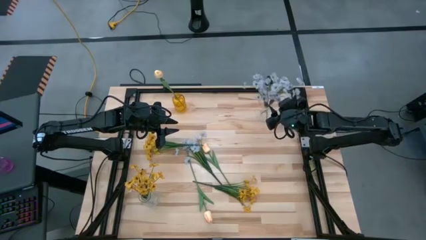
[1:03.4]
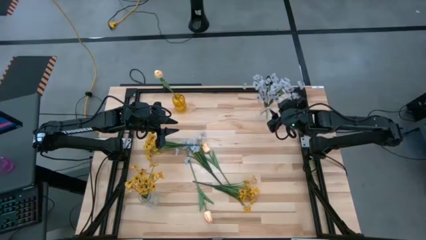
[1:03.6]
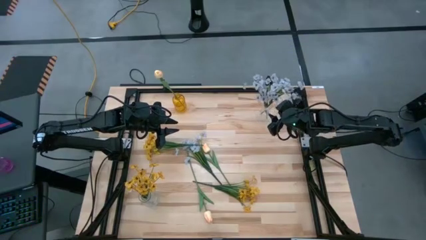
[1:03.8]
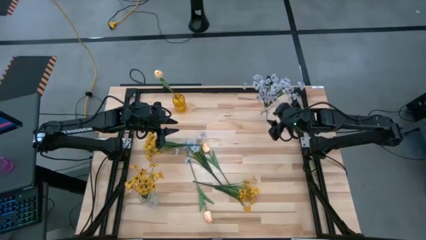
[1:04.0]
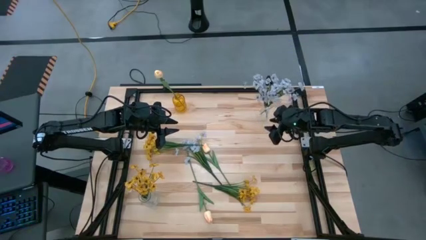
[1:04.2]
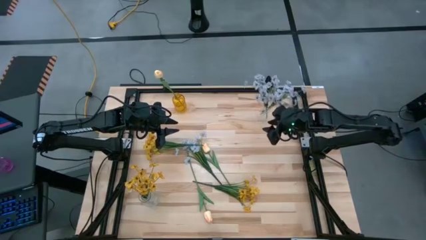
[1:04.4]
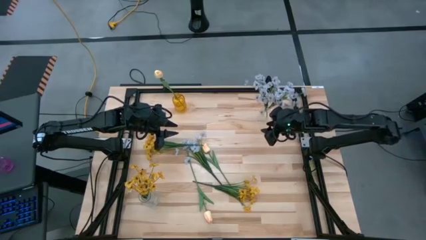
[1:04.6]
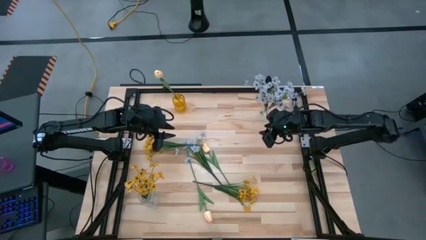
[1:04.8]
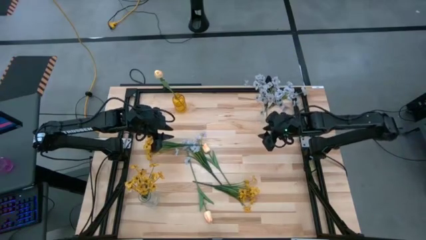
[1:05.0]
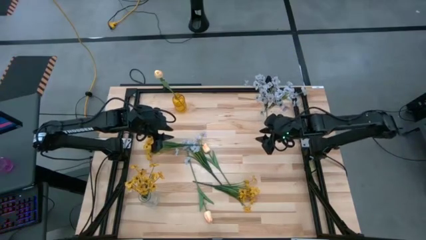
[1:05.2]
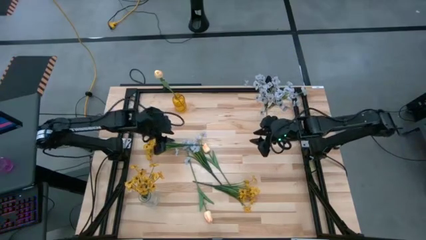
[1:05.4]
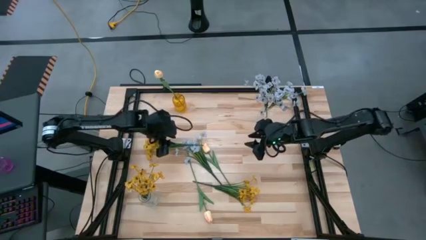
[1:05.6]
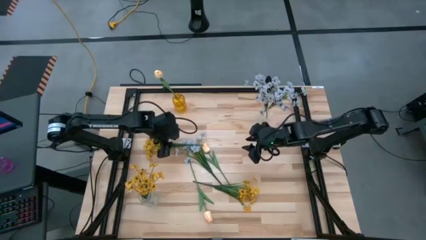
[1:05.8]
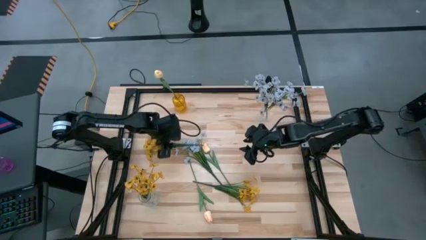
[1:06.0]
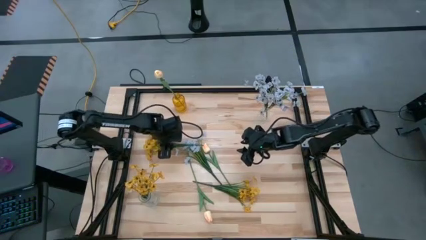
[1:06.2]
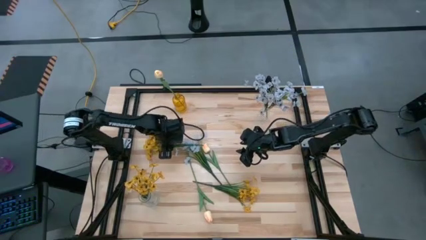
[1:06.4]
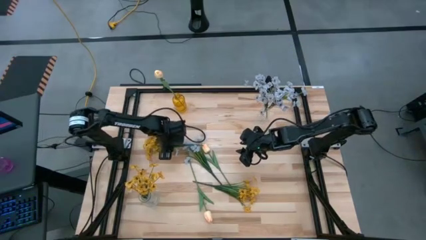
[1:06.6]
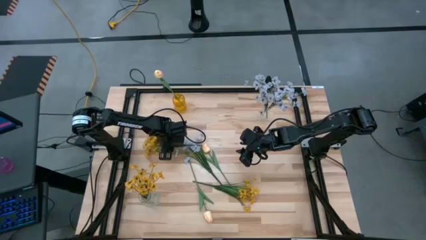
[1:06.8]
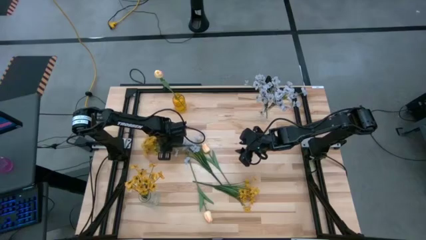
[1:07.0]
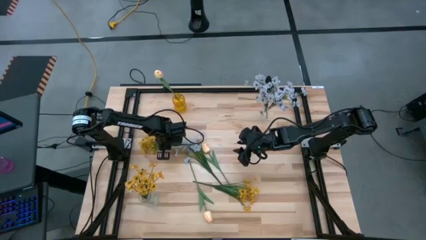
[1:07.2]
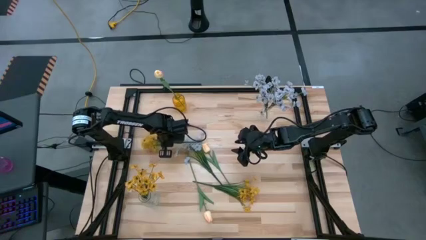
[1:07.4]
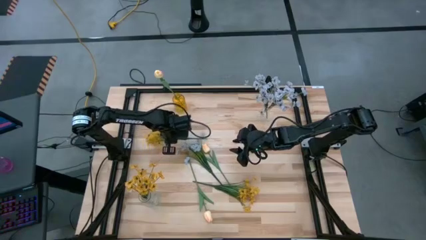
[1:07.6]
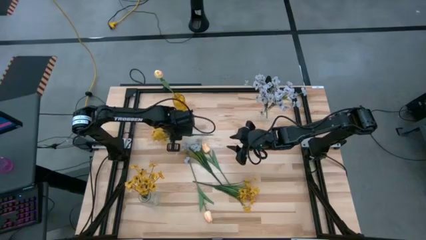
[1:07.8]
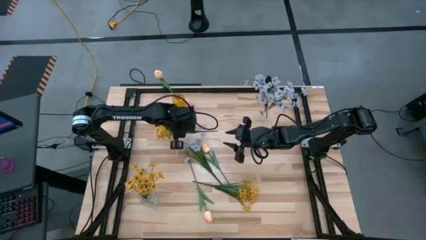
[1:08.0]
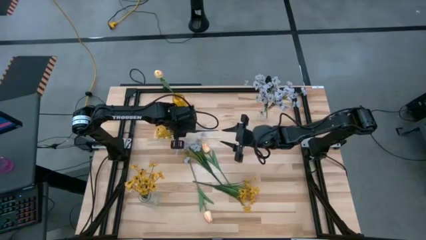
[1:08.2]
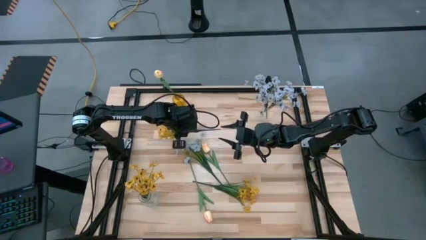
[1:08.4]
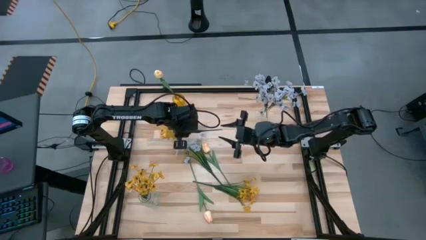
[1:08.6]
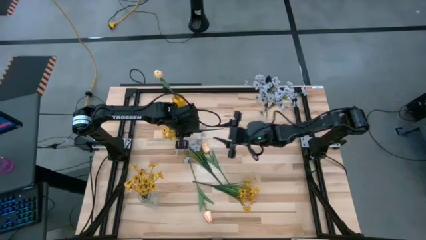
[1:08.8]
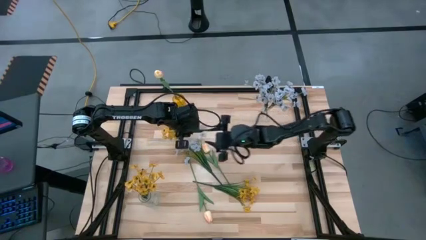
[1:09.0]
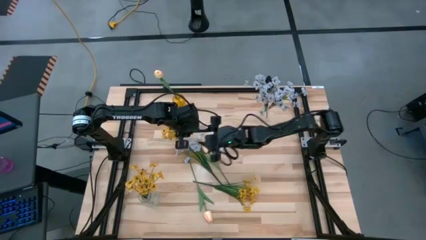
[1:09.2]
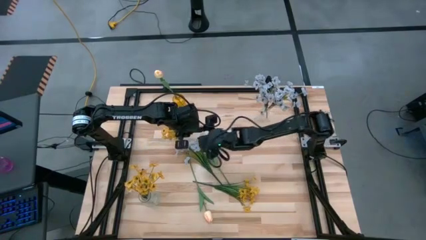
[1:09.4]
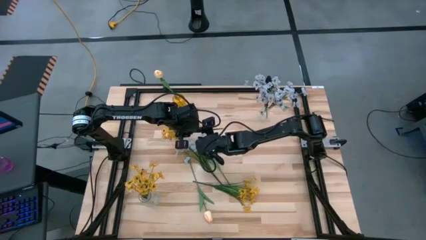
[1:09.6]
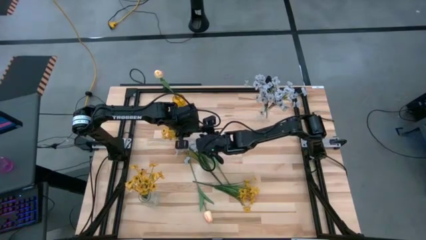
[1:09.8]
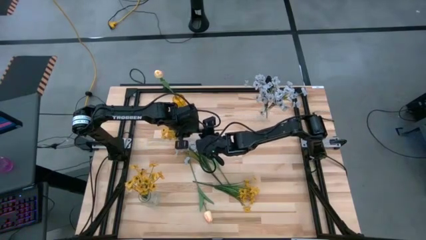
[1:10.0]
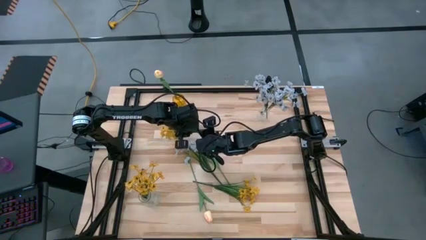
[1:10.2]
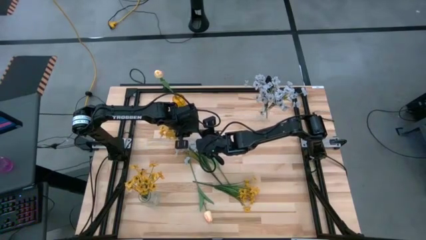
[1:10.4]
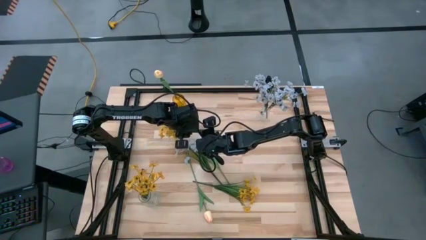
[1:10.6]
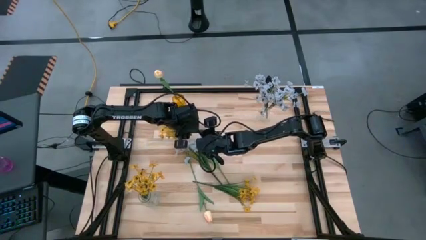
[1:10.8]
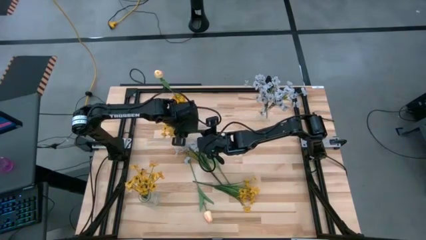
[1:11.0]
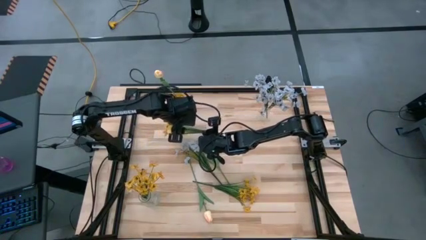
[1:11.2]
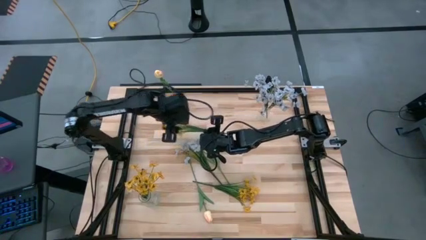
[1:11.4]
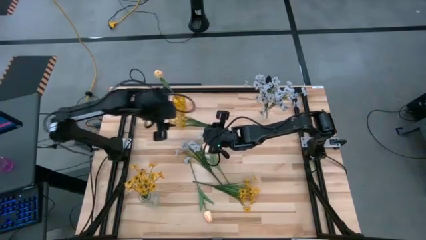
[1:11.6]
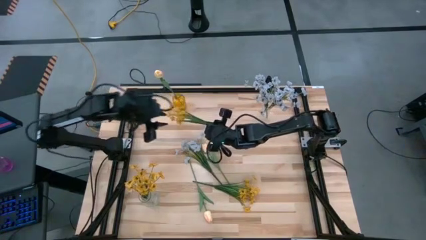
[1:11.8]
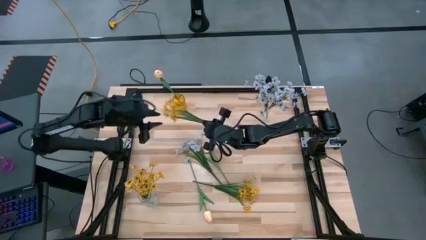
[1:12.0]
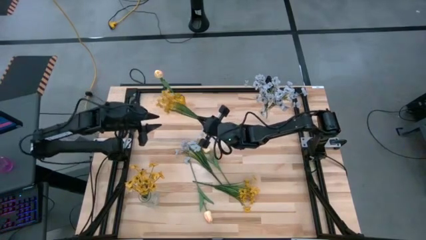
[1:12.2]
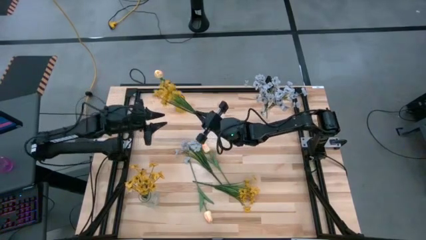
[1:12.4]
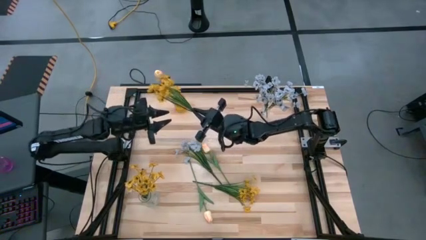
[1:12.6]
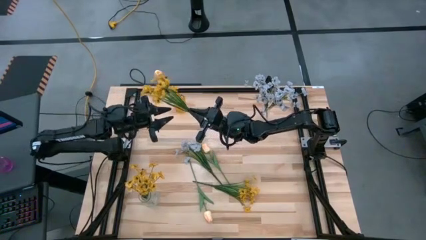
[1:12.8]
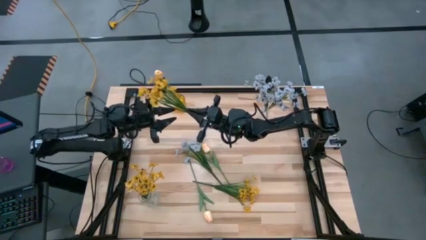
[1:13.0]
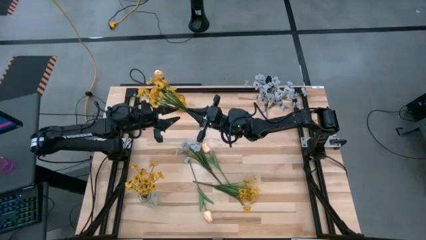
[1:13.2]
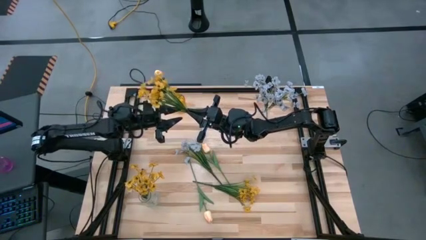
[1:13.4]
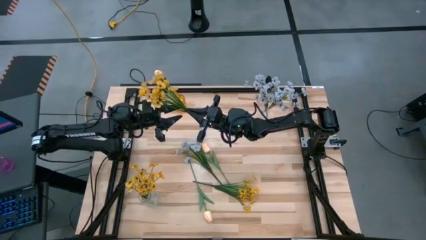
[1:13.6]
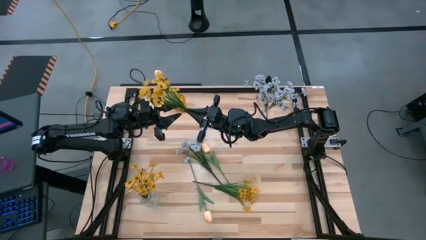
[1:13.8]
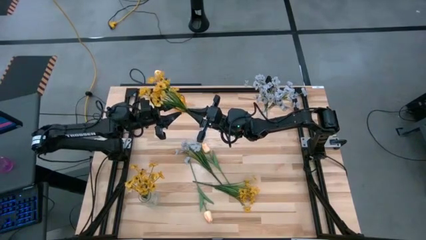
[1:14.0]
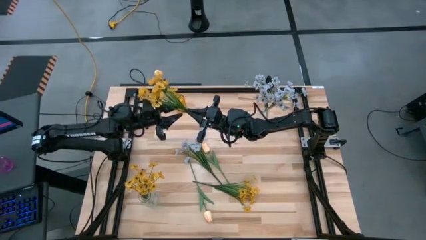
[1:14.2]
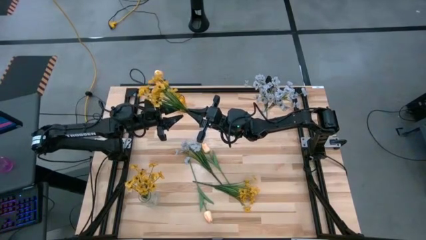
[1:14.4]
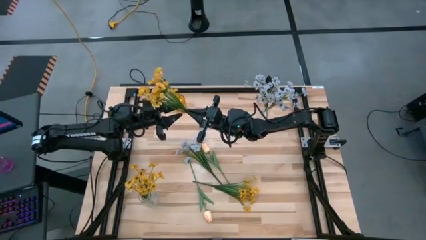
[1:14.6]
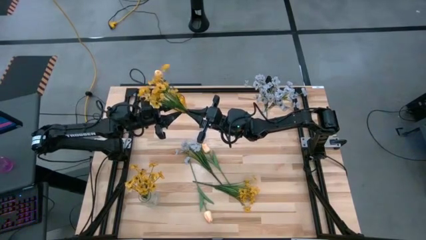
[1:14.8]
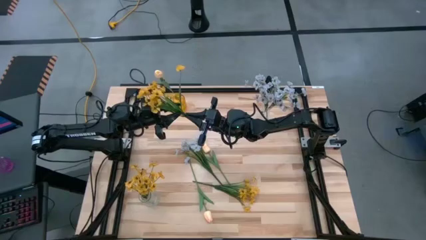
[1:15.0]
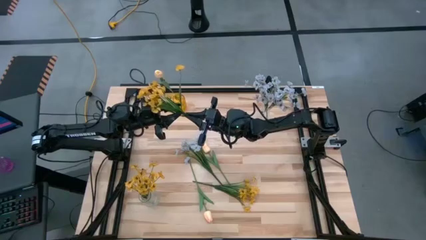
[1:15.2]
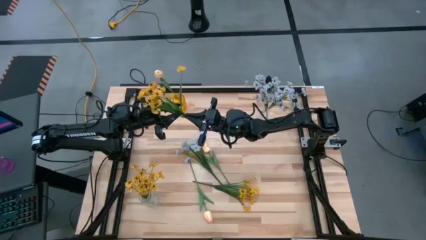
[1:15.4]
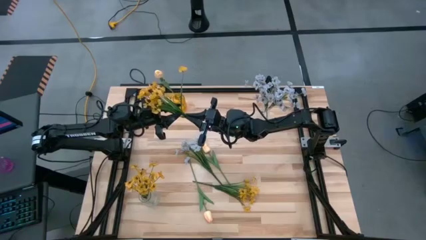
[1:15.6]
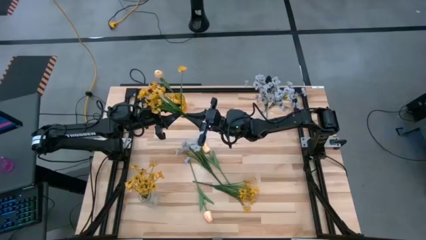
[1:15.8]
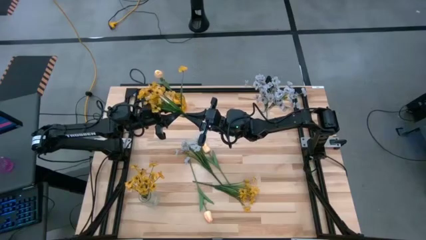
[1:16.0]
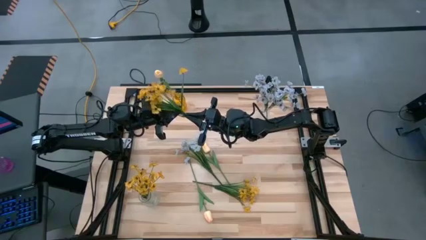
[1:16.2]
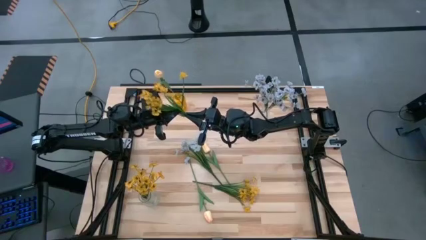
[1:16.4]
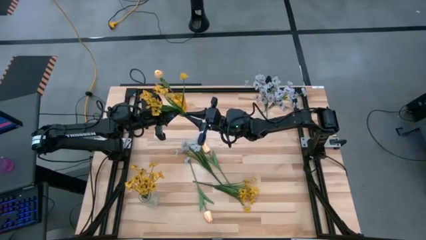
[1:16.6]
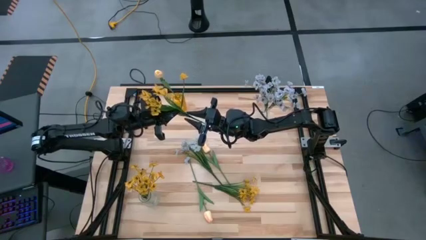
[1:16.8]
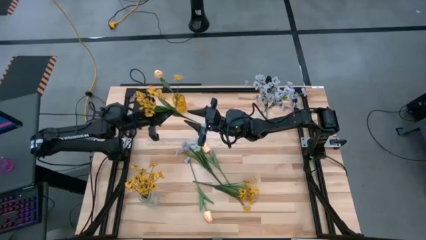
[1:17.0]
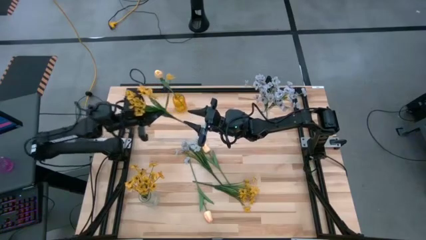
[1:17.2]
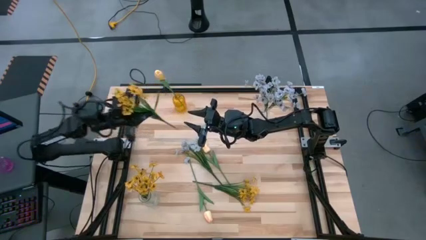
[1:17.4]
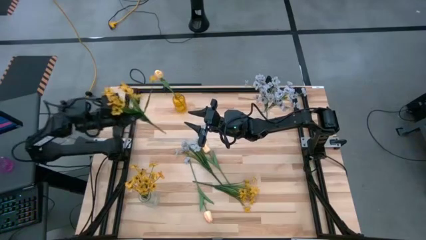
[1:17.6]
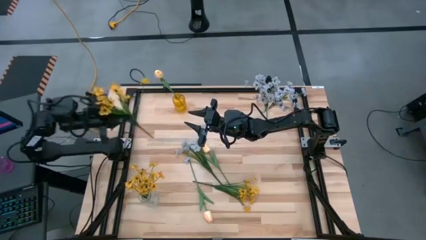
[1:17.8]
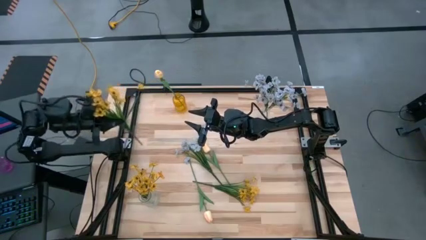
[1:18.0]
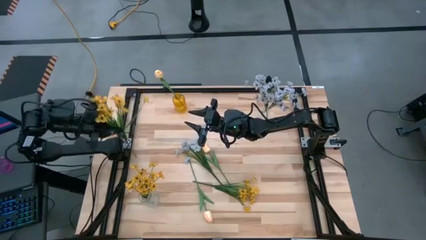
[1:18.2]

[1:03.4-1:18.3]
Task: Sort flowers into vase by color
Put the top yellow flowers into the bottom transparent vase
